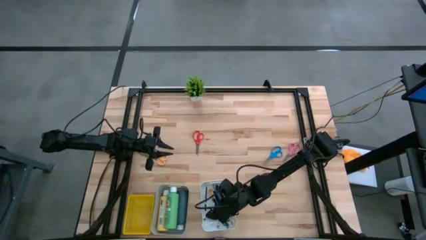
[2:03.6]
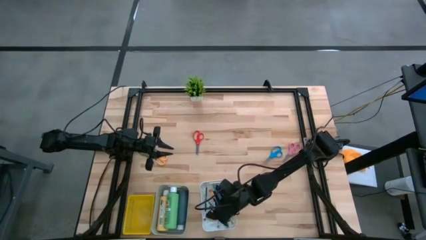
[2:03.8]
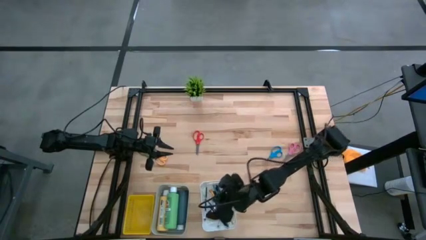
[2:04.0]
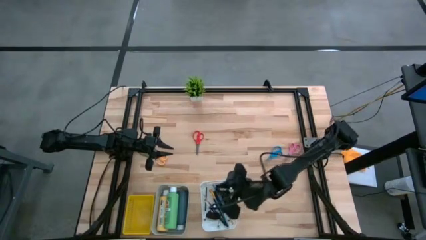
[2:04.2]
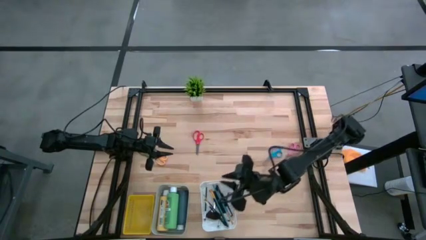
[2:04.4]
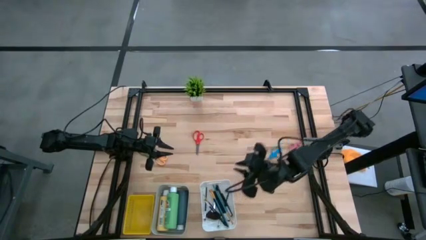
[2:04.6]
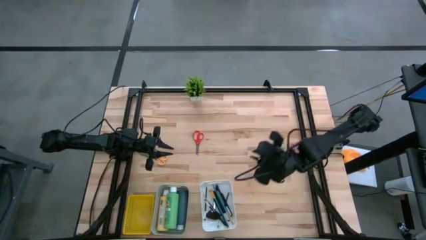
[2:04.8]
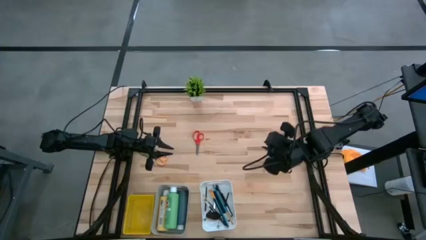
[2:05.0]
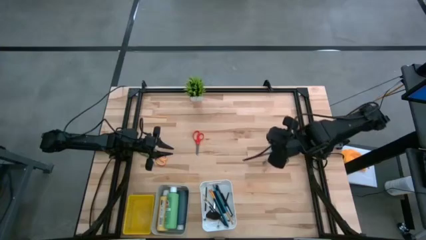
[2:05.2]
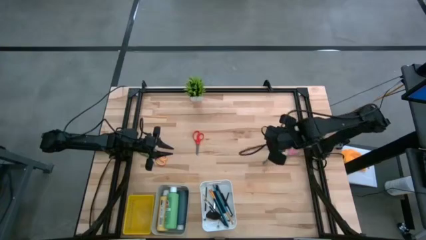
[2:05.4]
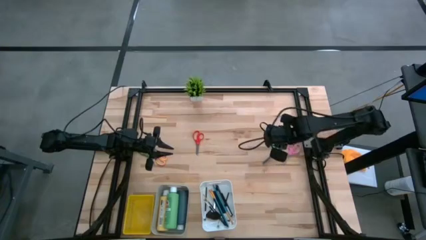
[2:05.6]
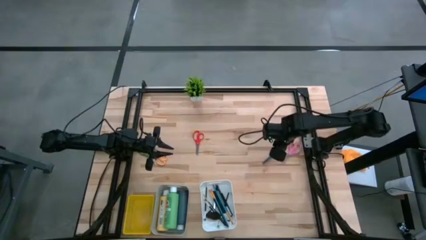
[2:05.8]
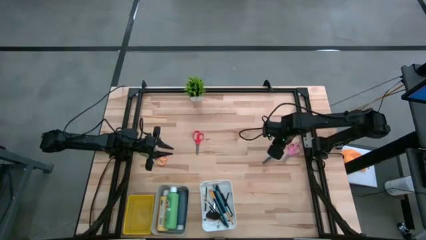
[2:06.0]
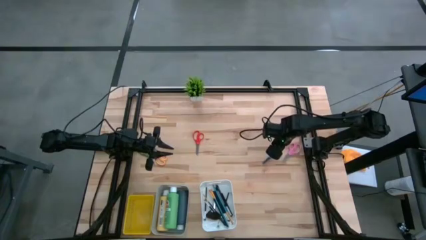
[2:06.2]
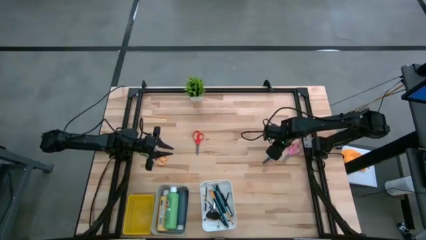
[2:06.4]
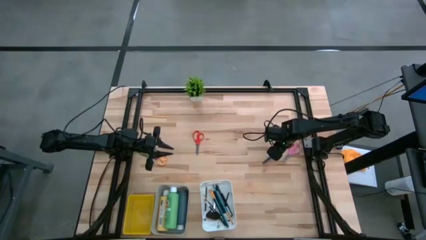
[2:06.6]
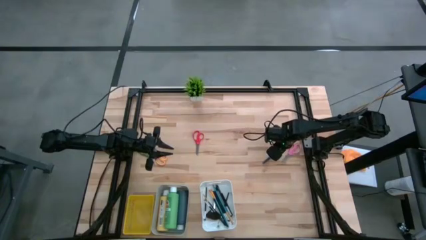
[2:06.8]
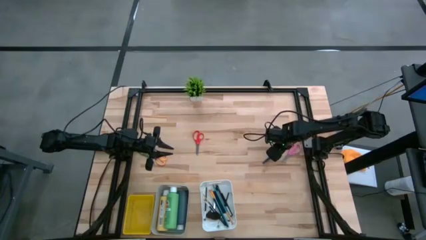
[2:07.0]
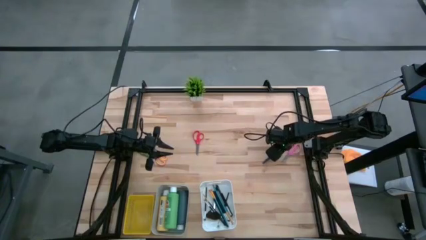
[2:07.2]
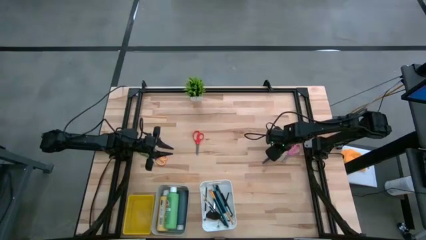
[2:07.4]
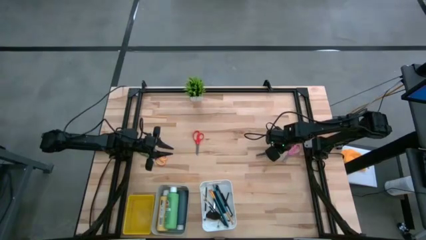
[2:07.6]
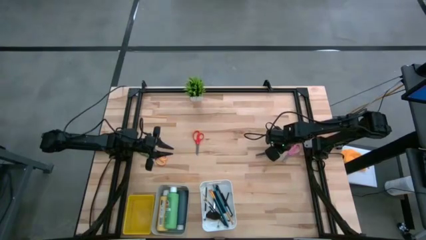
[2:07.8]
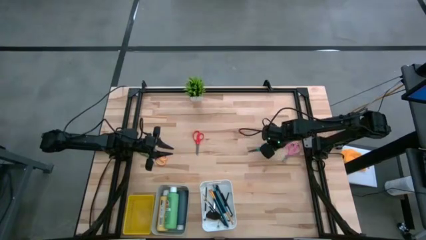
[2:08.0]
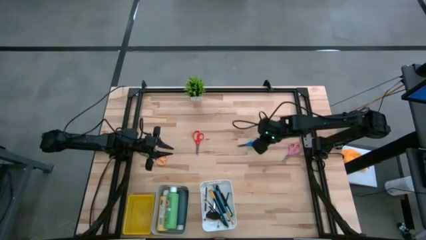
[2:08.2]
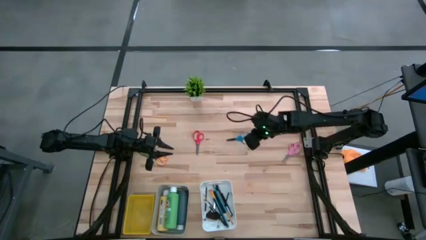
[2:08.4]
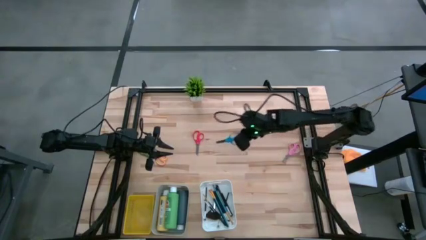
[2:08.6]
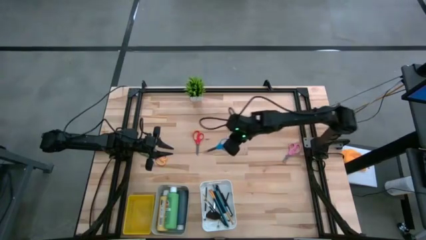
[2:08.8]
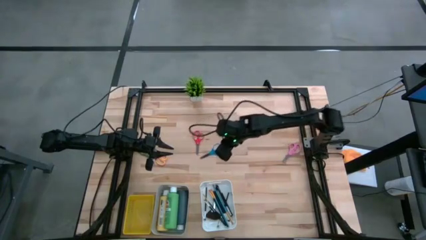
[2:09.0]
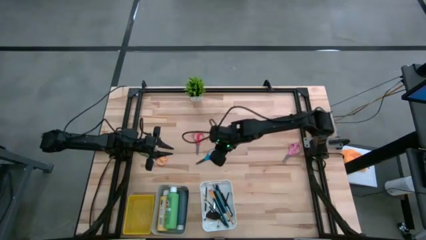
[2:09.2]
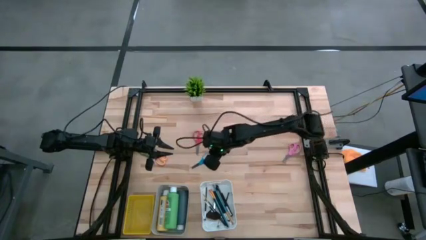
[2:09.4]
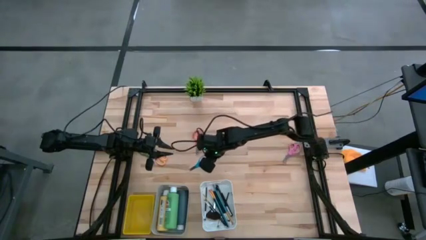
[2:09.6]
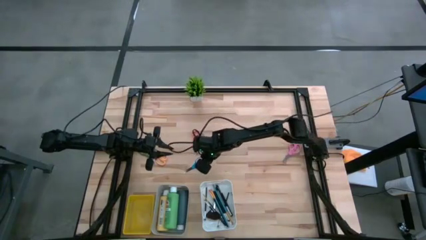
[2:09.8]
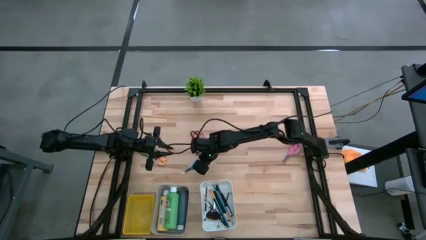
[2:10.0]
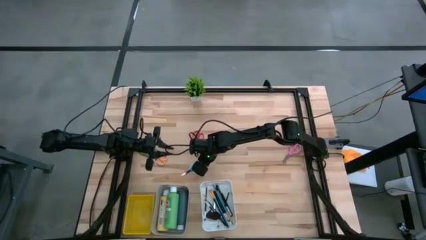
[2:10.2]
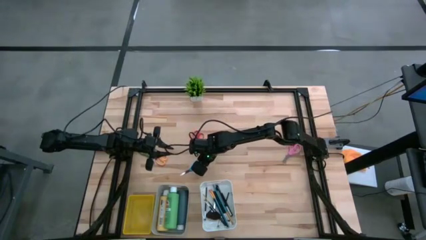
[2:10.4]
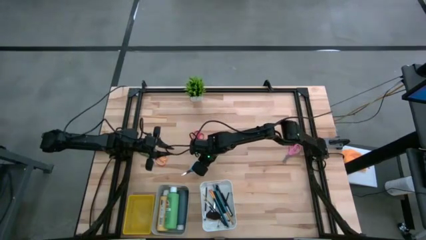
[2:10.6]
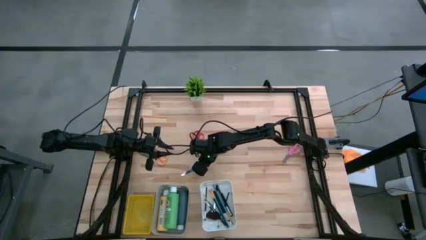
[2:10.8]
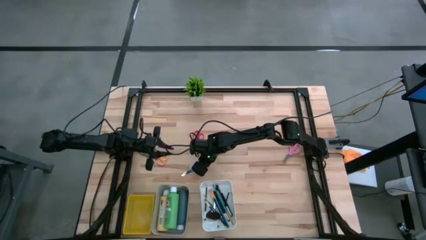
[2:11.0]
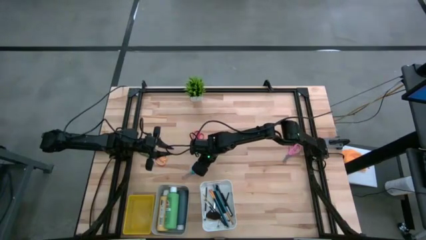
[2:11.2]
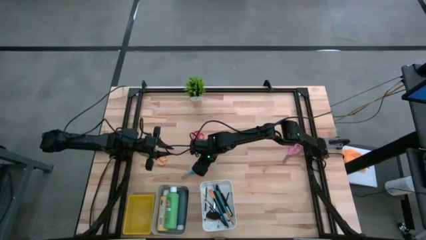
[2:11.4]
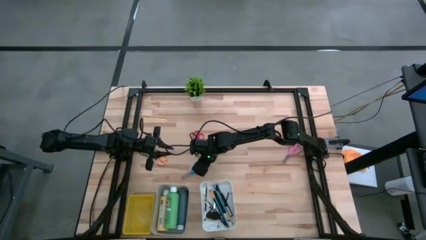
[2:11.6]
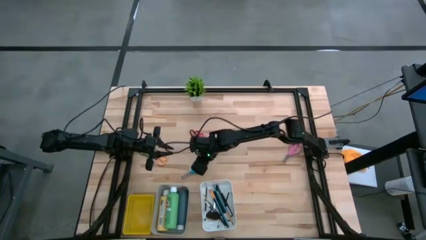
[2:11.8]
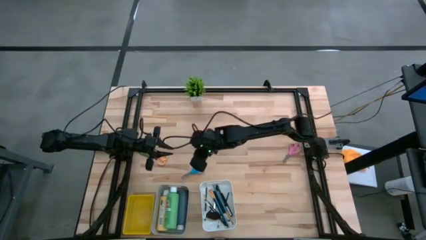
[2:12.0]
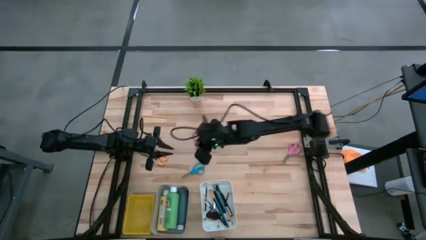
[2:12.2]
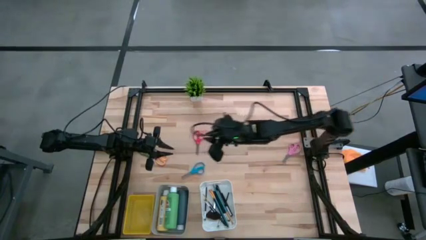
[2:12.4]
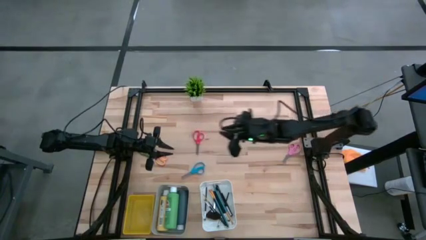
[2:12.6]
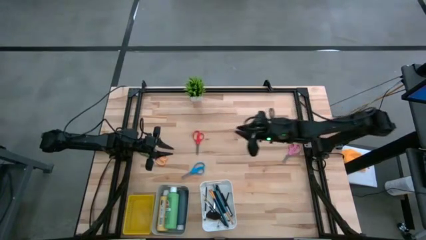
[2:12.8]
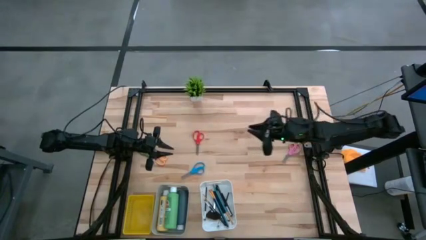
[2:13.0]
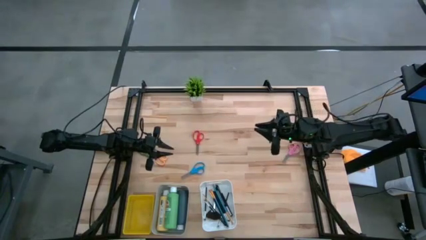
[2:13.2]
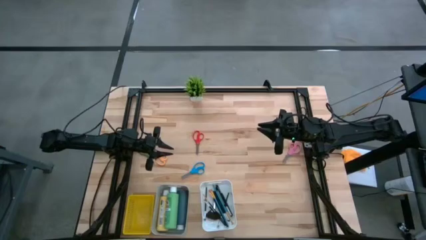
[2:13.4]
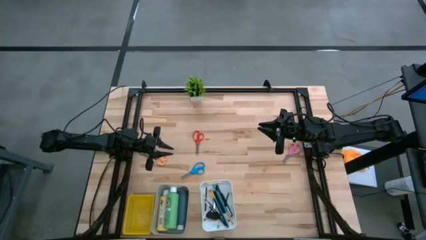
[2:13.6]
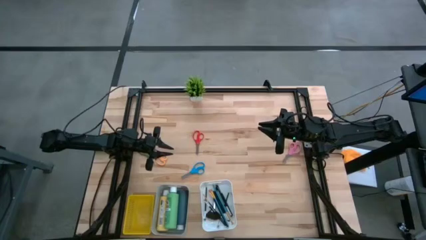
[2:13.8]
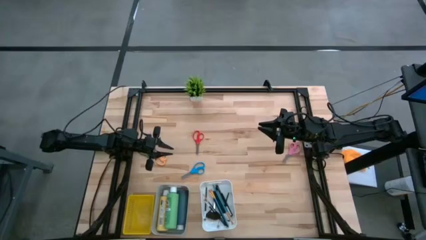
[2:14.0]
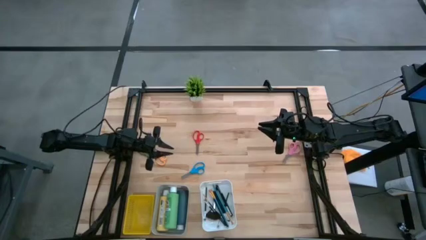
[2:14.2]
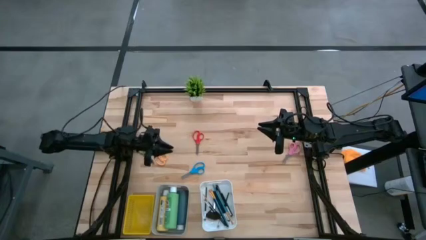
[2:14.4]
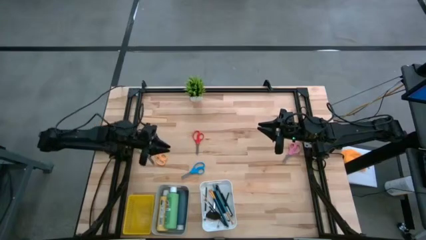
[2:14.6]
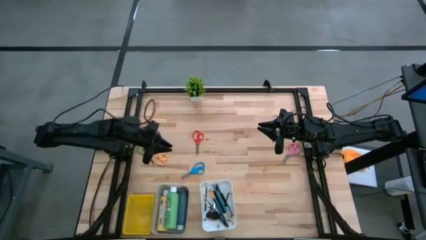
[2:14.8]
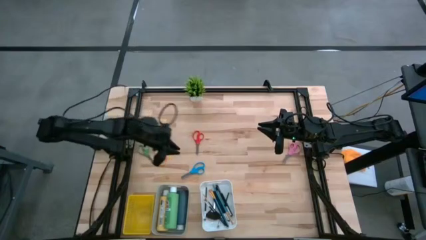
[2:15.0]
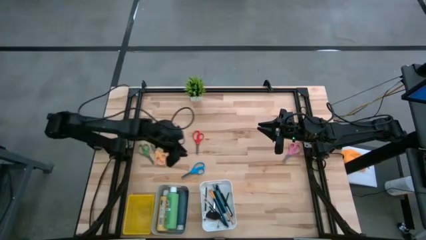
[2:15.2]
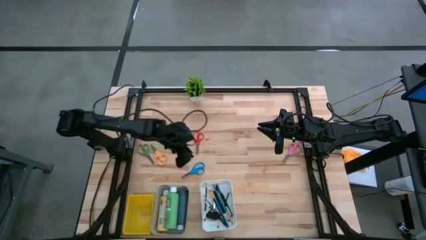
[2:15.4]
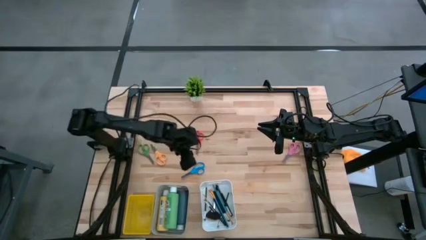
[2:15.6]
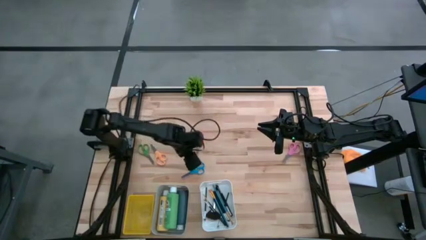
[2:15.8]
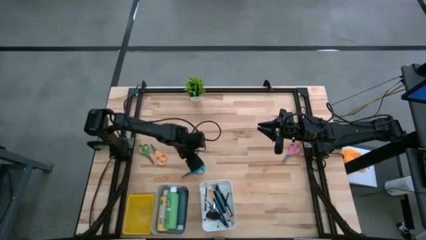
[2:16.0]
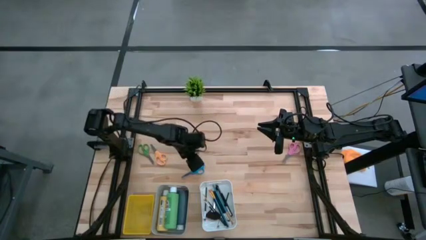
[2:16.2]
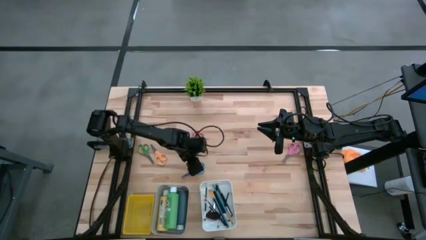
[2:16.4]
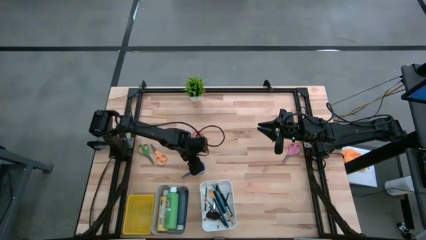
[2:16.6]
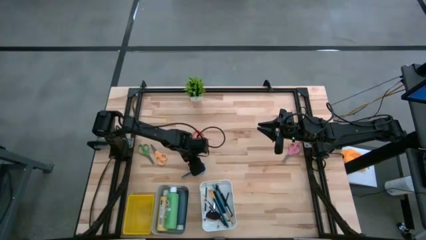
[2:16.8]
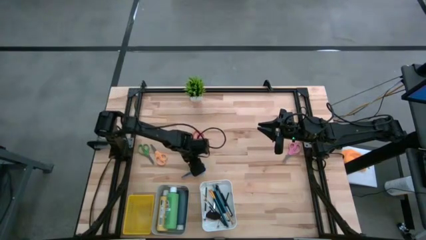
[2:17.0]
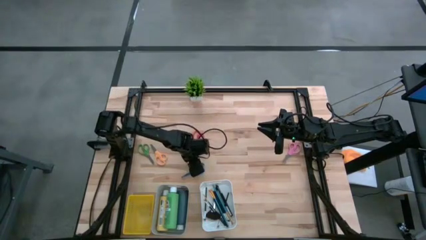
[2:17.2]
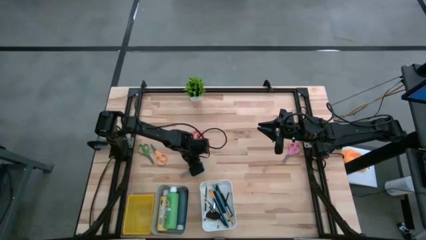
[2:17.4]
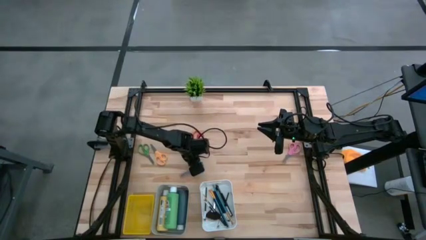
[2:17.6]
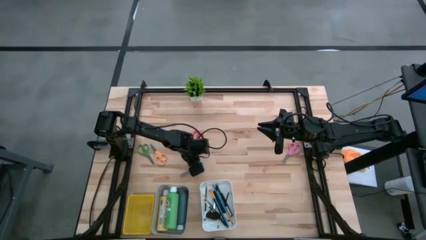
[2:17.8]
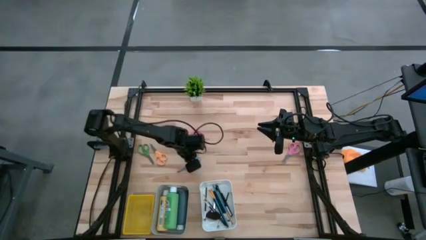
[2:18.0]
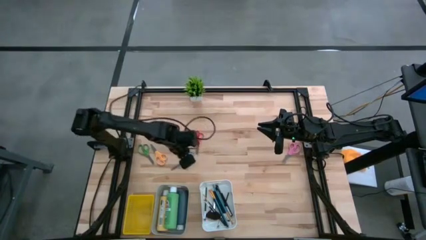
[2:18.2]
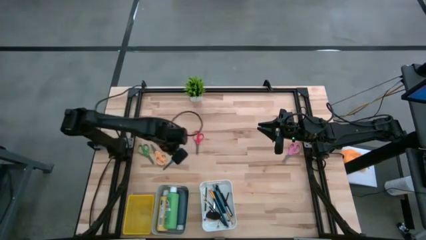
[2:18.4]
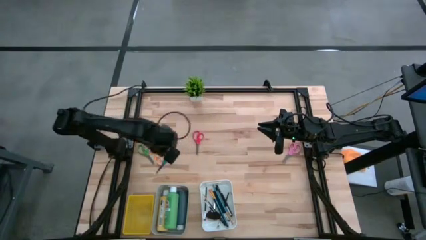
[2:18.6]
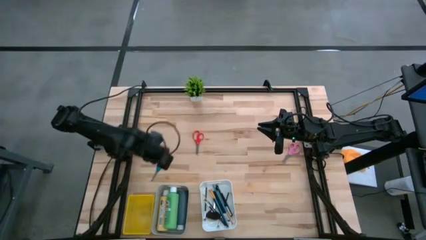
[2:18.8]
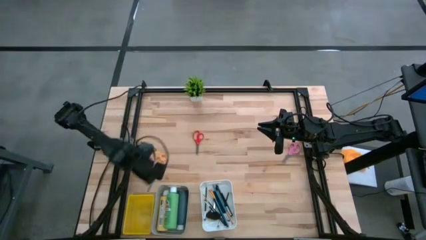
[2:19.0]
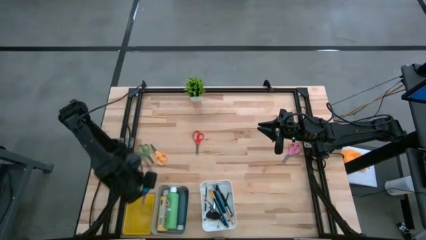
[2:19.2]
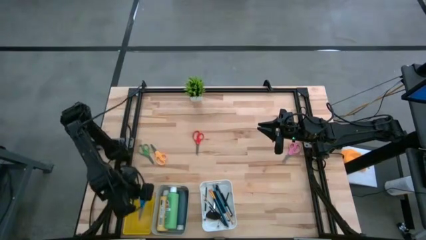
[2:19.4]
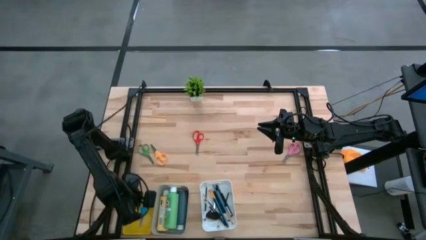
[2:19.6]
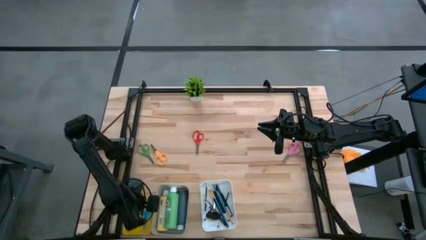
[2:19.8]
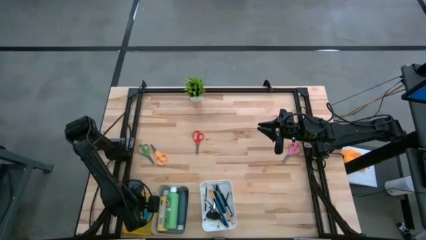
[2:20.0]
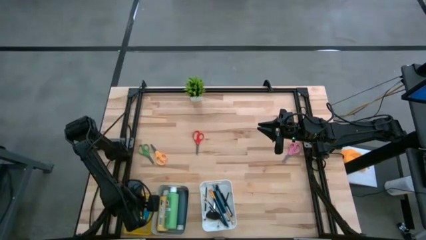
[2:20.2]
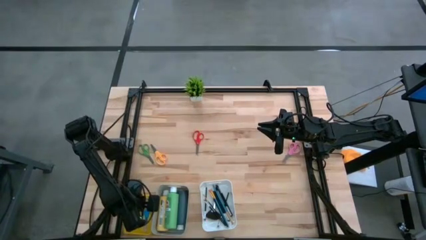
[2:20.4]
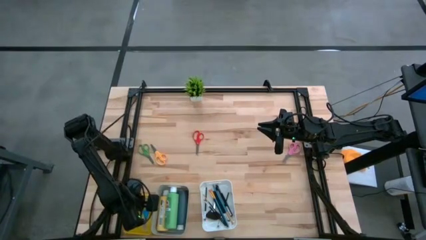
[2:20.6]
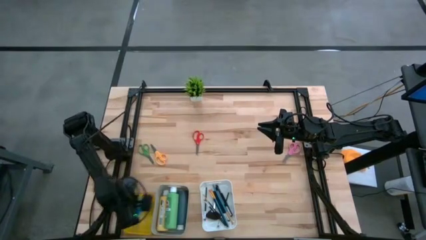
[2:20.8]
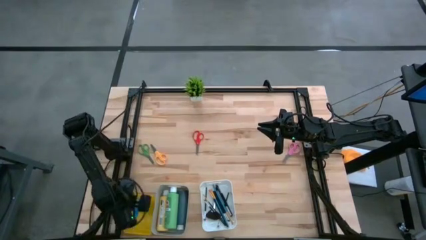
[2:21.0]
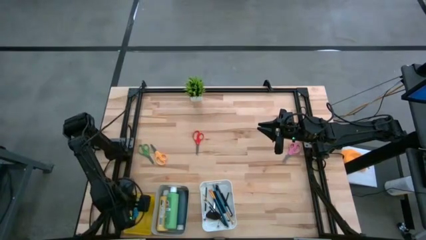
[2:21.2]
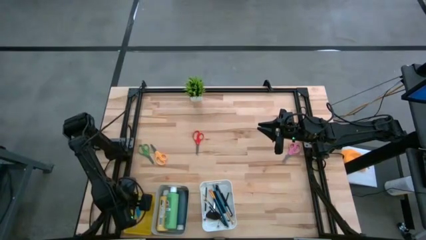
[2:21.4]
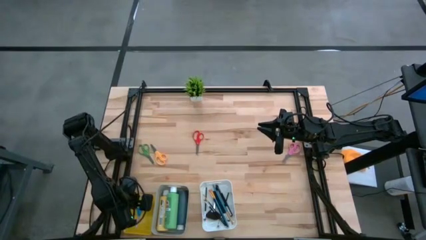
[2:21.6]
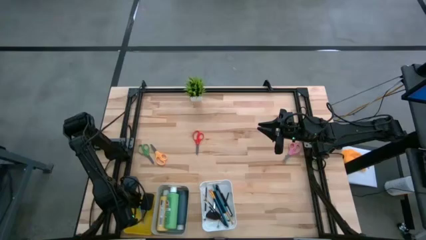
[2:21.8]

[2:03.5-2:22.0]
Task: Pick & Place Paint Supplies
Put the blue scissors into the yellow bin
